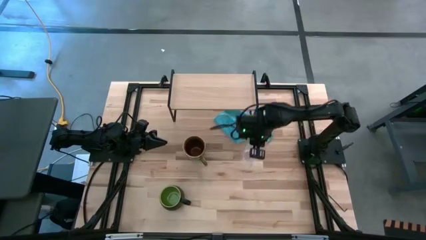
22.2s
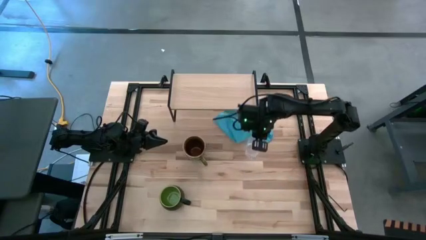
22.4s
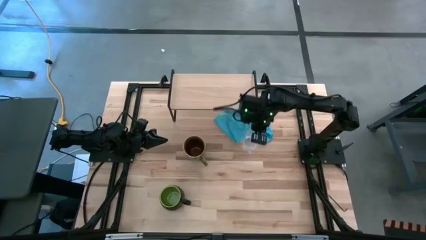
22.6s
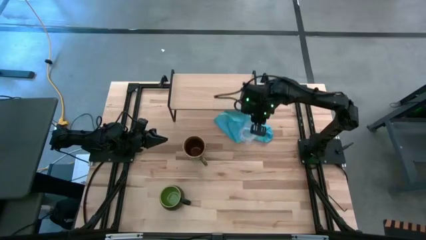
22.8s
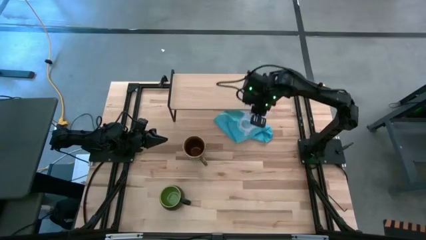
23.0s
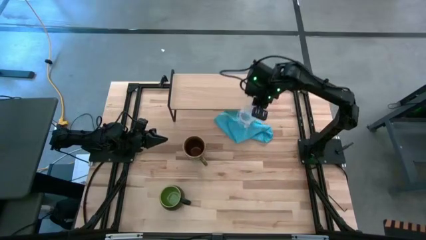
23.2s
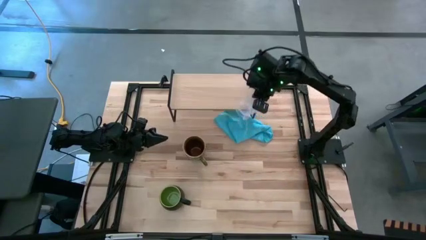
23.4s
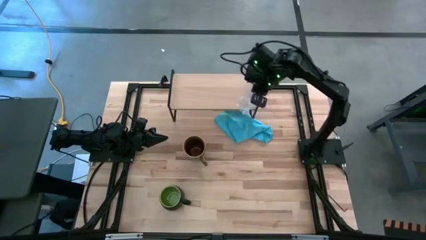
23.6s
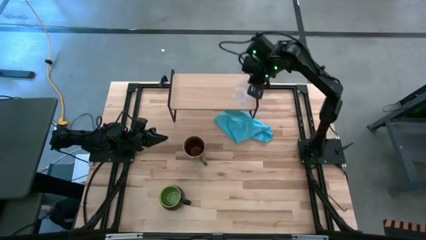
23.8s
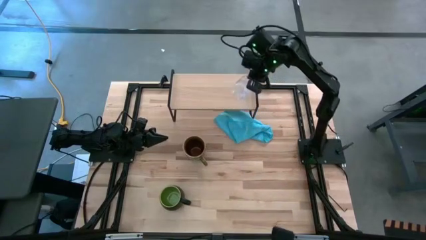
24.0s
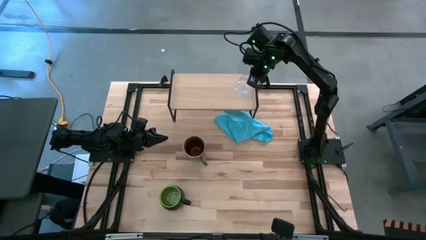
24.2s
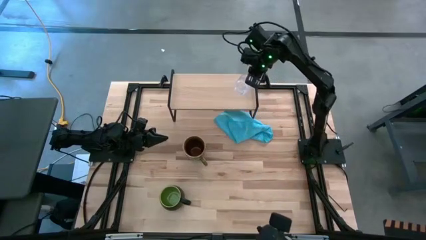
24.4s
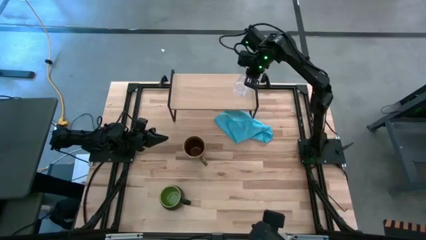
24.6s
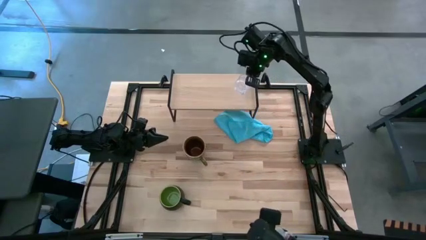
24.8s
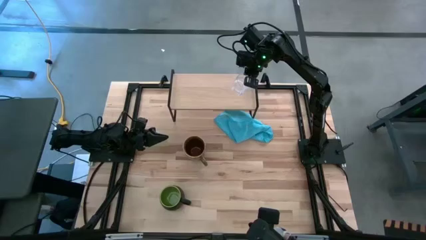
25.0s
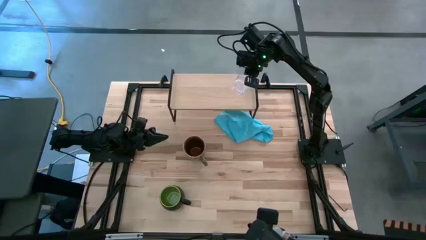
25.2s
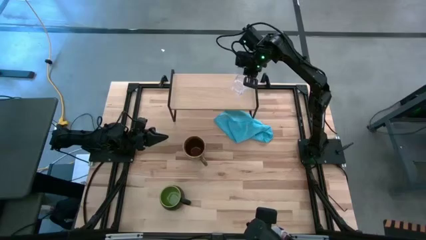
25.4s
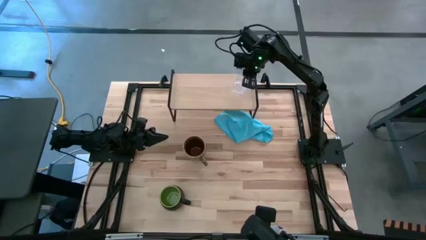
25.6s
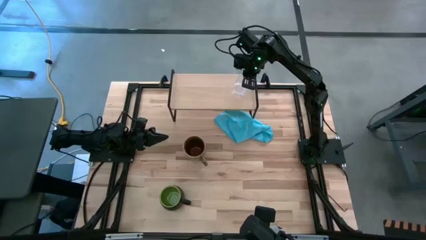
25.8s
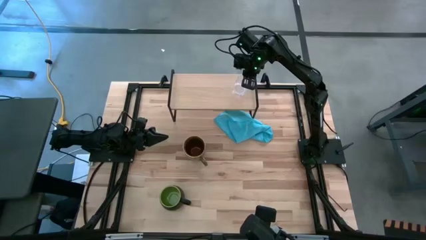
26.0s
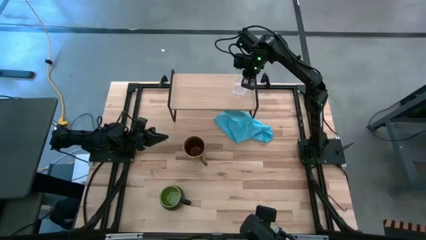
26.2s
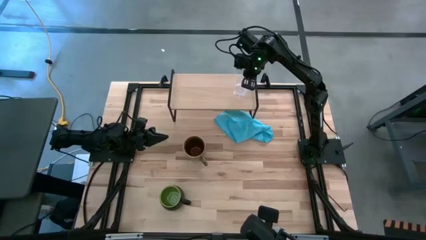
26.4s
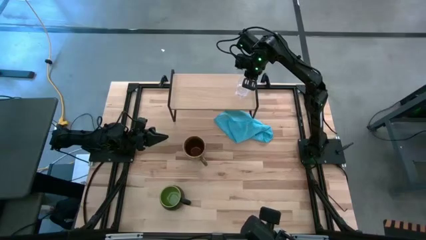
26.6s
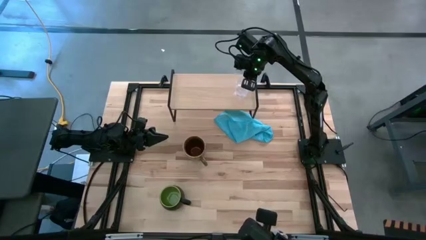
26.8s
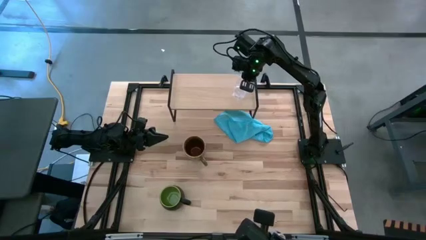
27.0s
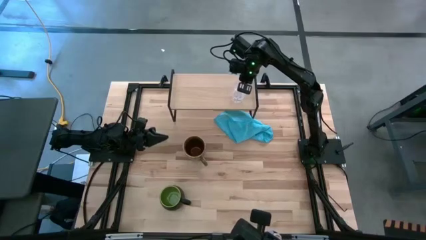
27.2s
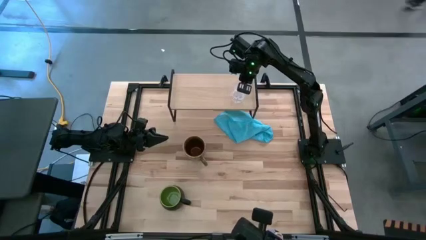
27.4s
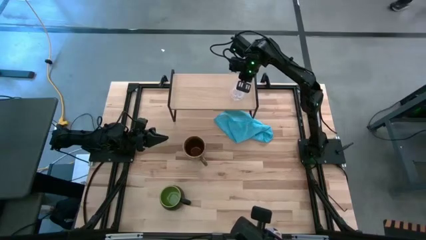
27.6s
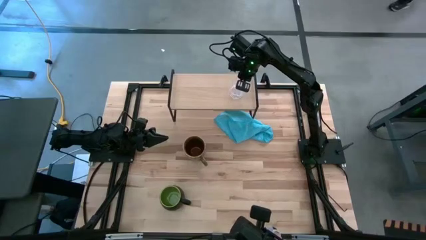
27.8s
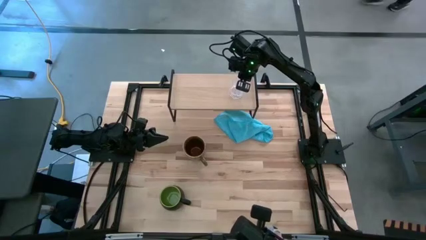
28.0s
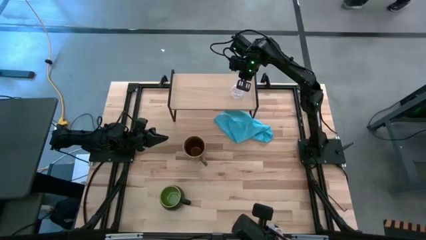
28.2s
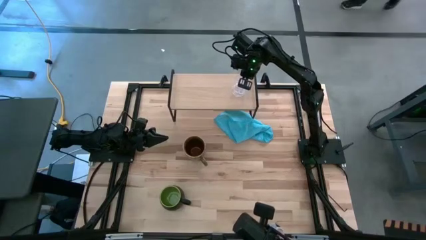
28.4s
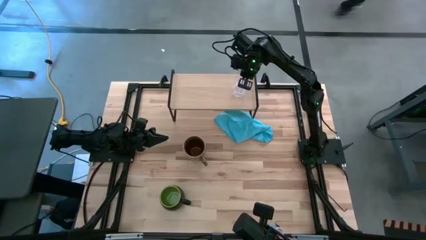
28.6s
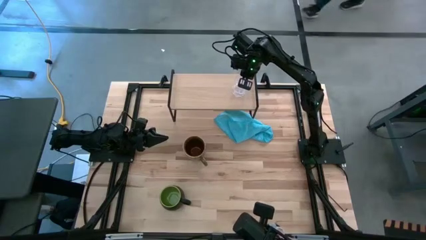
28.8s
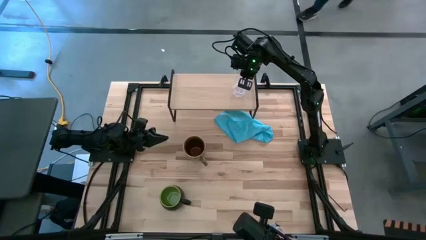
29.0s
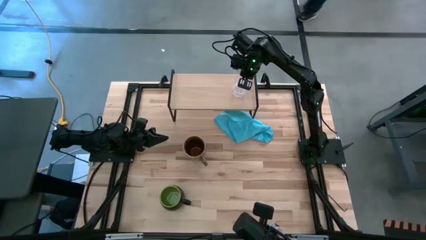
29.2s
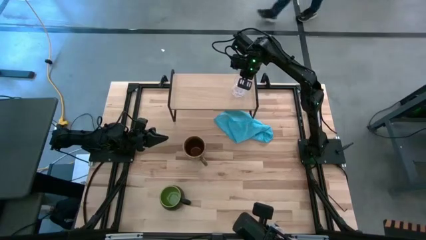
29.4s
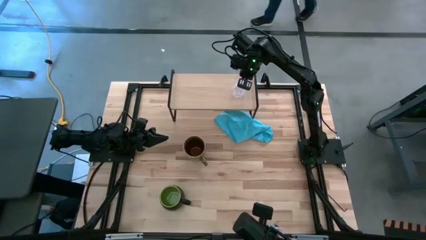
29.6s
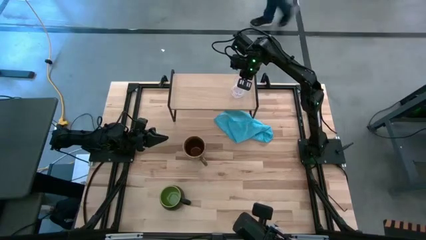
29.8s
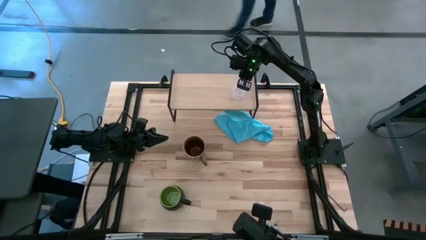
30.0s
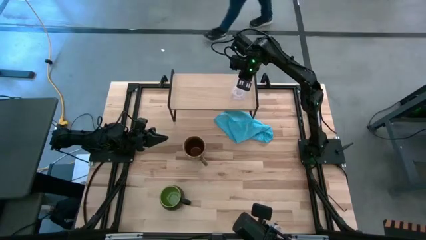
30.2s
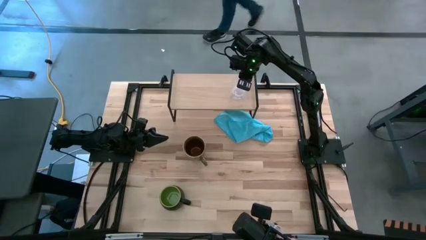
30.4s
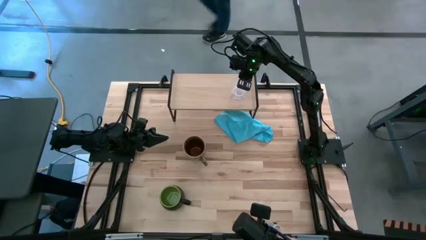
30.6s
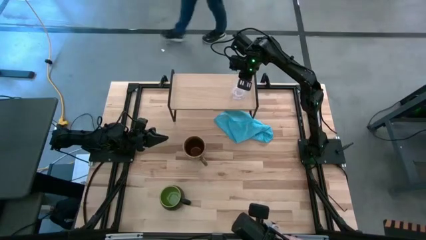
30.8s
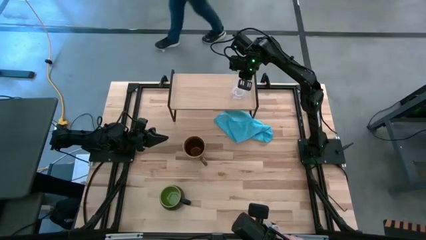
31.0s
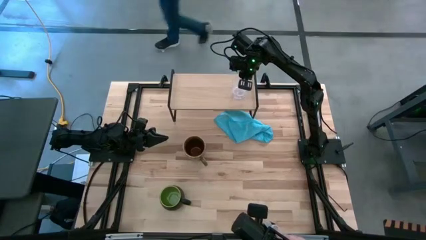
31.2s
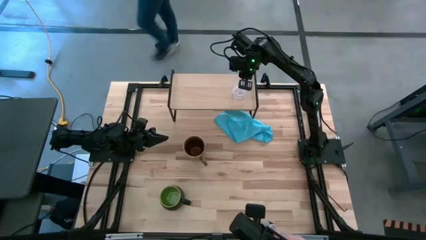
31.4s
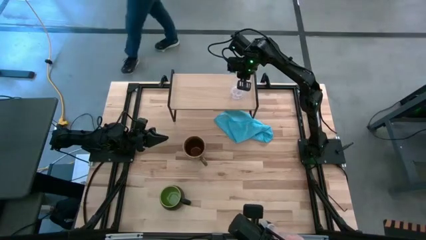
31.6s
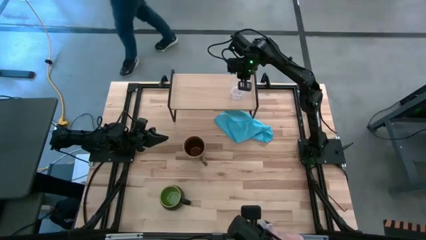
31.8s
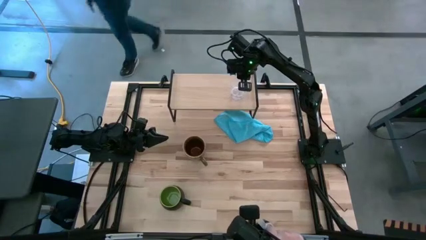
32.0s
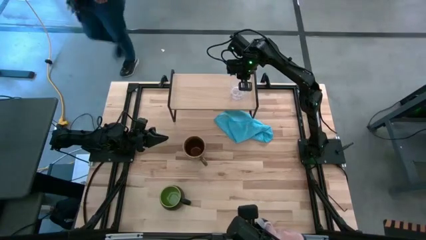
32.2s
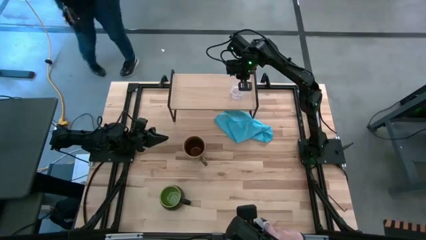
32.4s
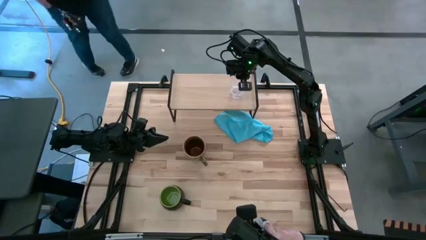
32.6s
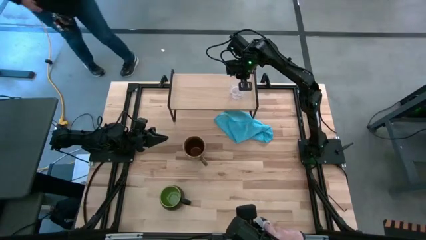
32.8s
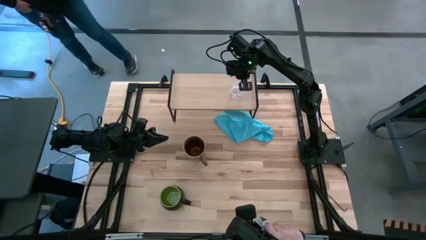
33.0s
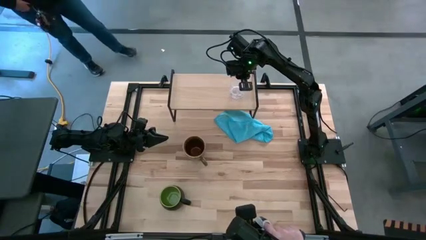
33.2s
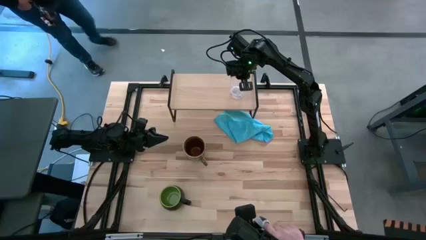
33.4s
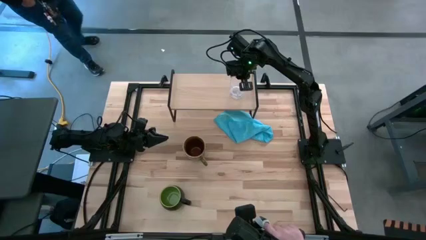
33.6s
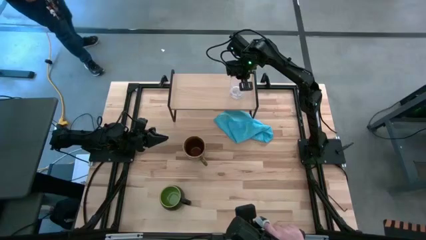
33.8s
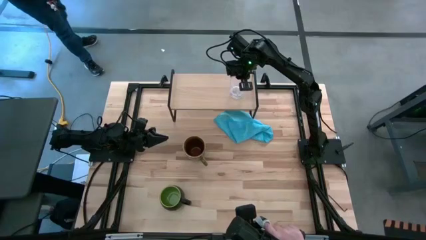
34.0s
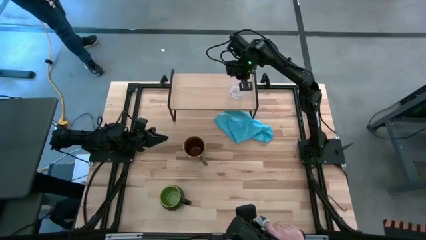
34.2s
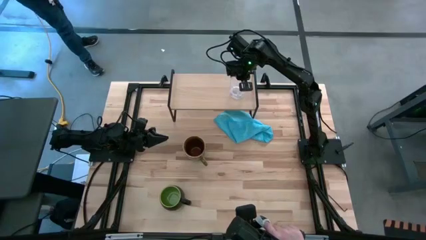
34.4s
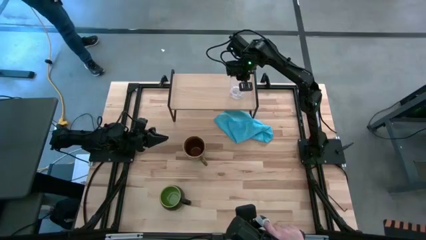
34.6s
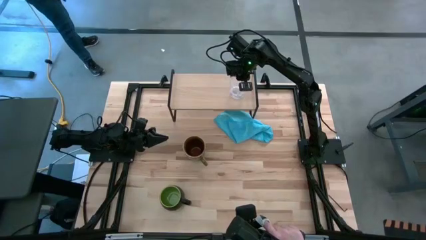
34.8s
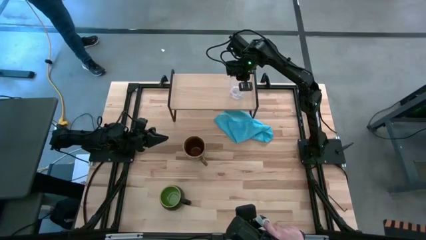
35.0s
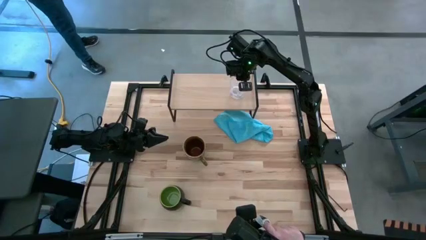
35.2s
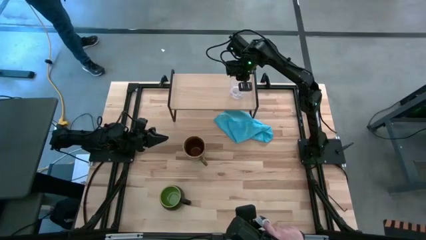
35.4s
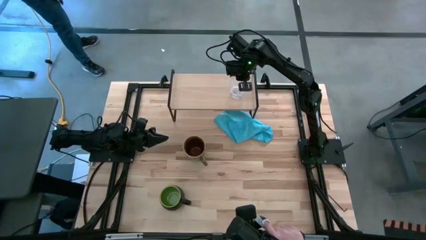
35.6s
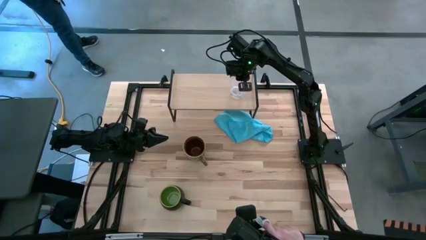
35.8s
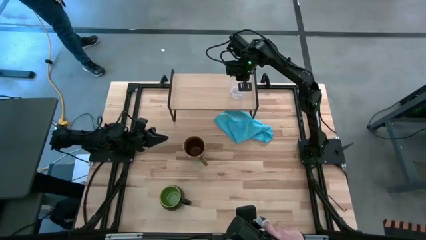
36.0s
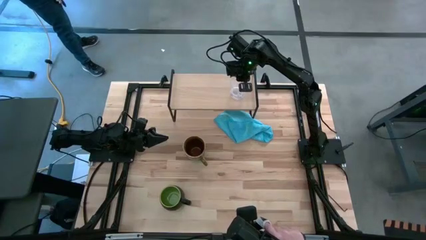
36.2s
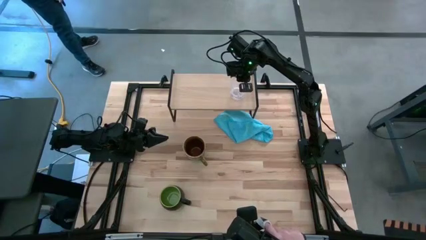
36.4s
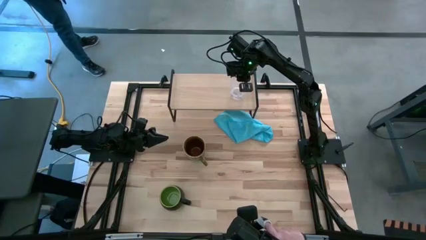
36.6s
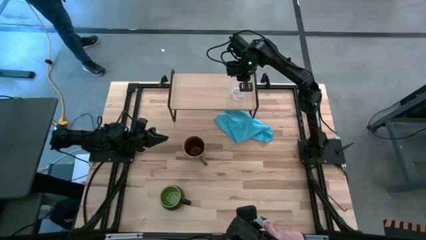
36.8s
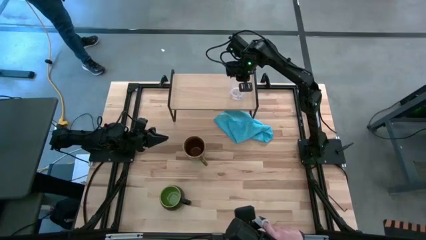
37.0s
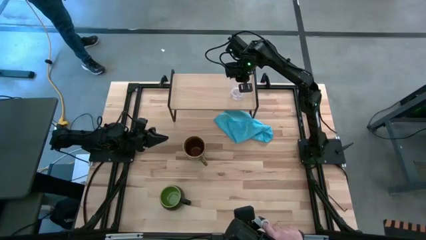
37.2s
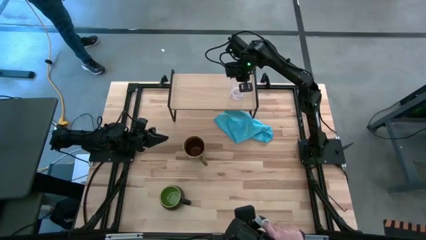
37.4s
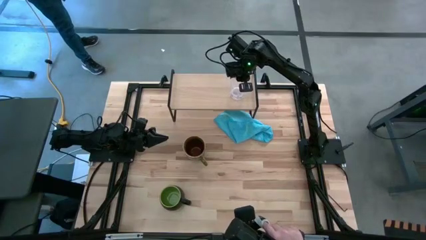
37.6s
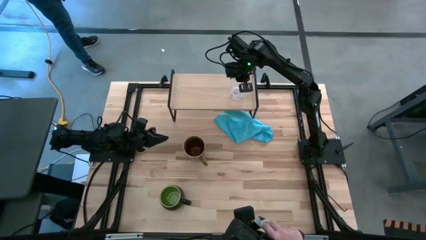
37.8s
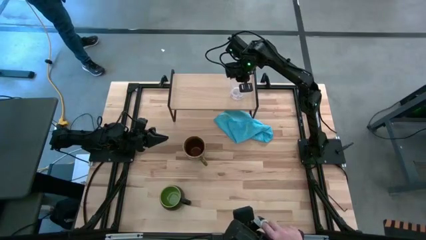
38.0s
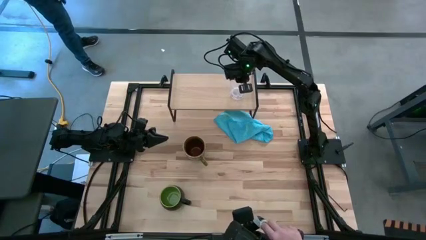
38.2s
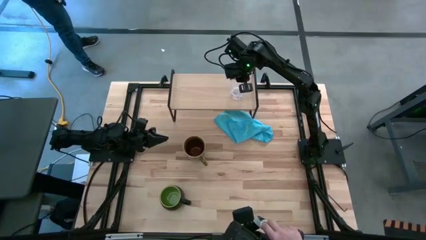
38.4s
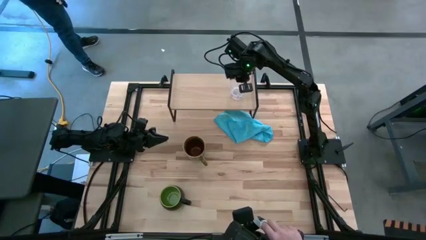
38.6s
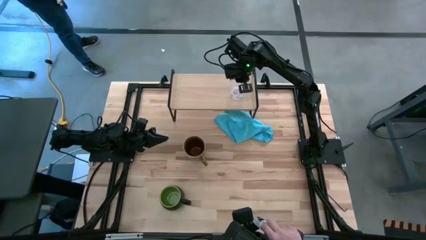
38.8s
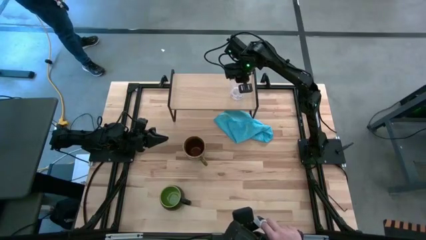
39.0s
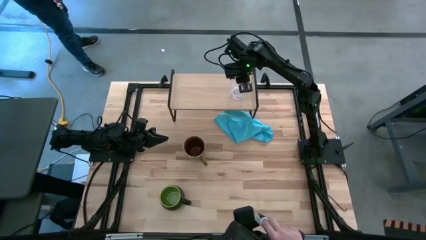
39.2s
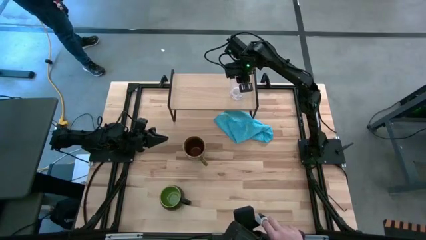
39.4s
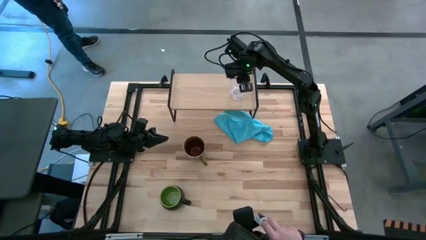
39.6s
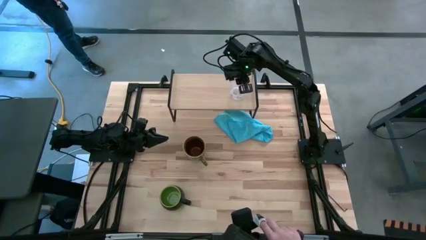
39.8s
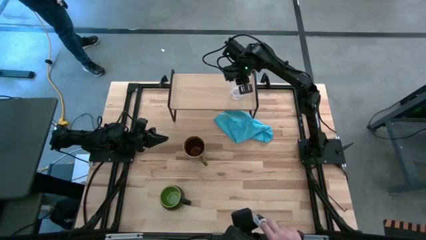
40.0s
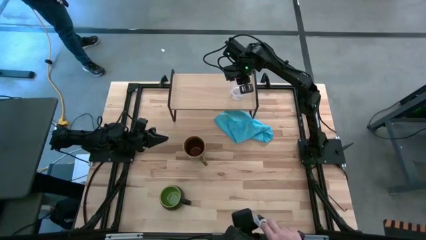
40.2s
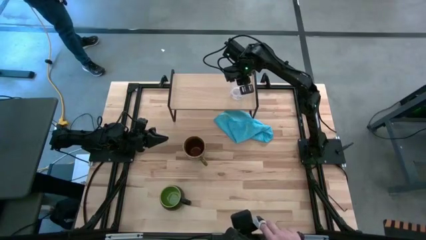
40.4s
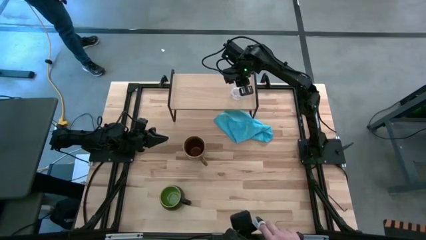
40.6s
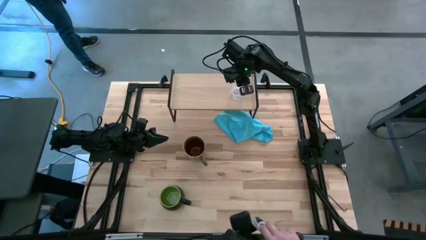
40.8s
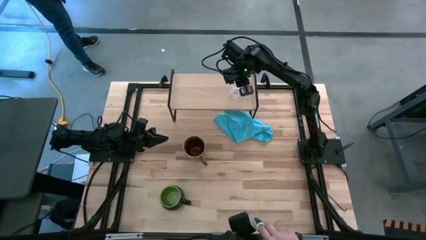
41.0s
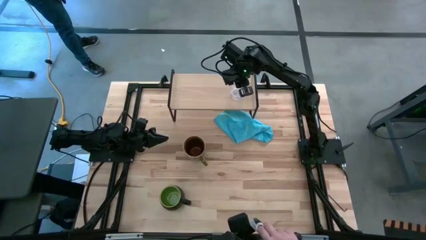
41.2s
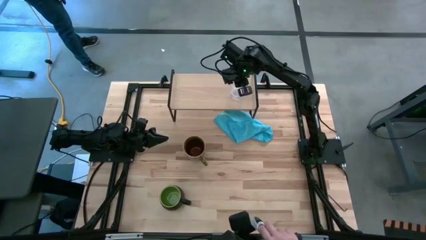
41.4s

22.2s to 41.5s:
Task: Stack small to large cups/mugs on shelf
Put the transparent mug on the shelf
